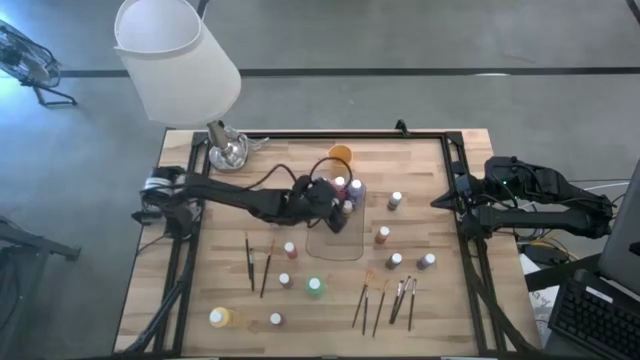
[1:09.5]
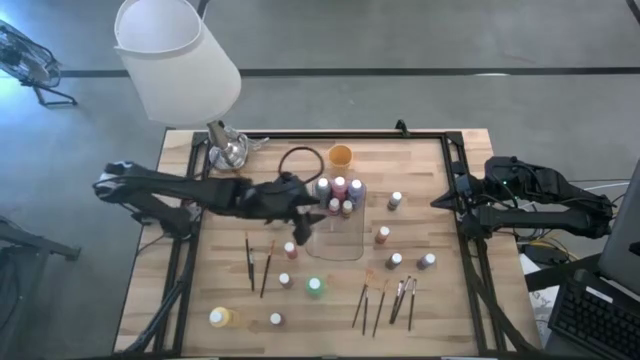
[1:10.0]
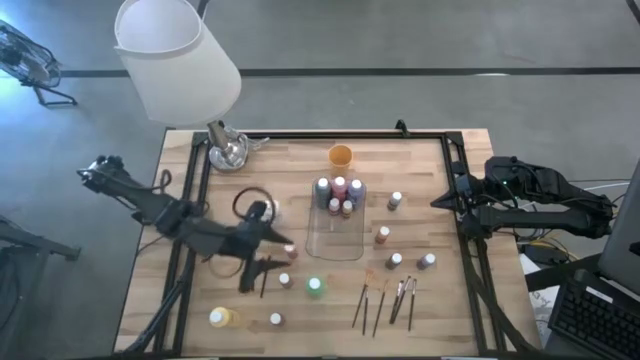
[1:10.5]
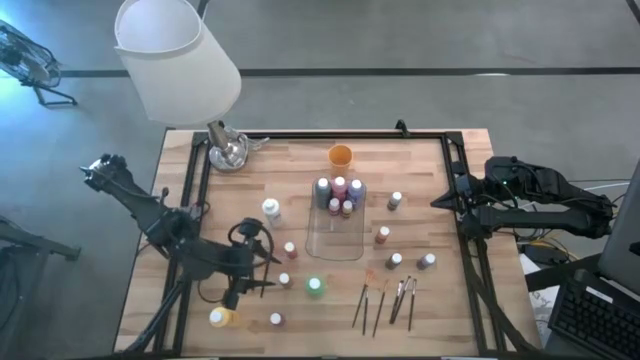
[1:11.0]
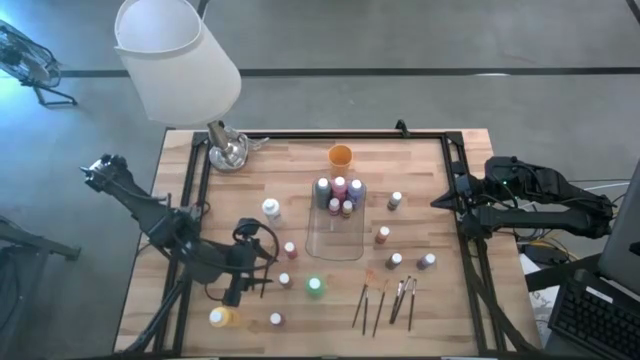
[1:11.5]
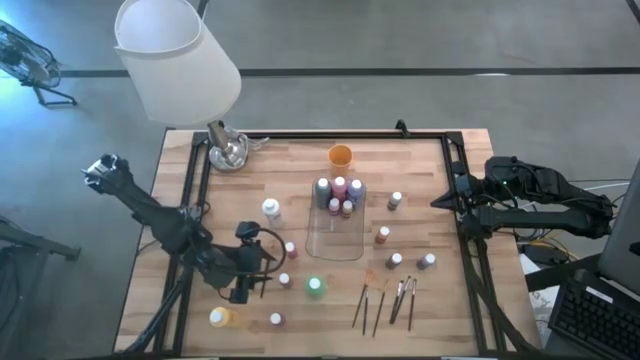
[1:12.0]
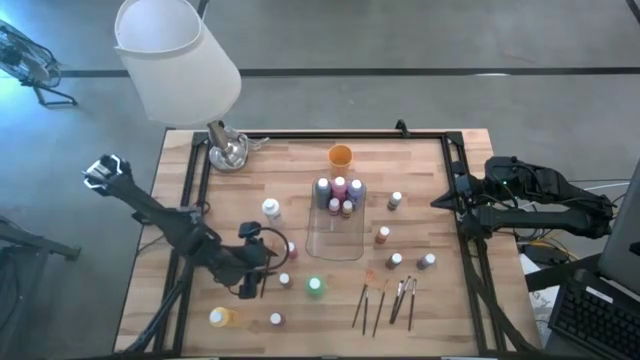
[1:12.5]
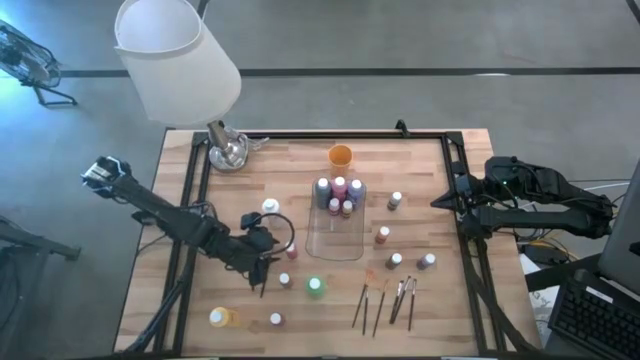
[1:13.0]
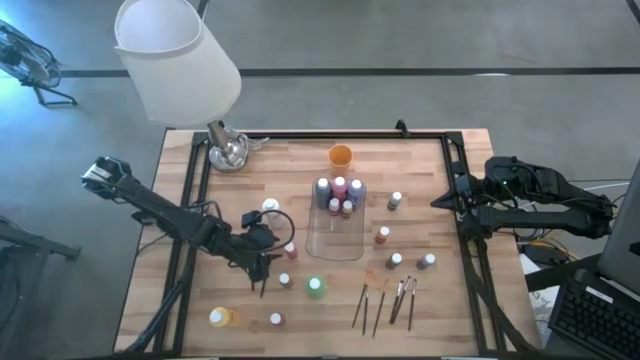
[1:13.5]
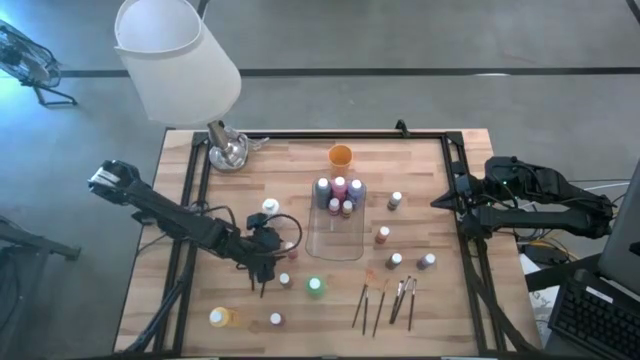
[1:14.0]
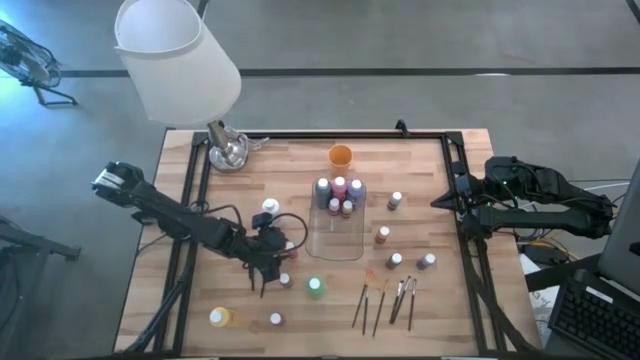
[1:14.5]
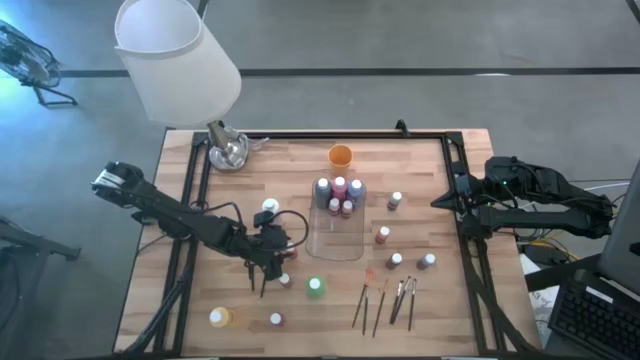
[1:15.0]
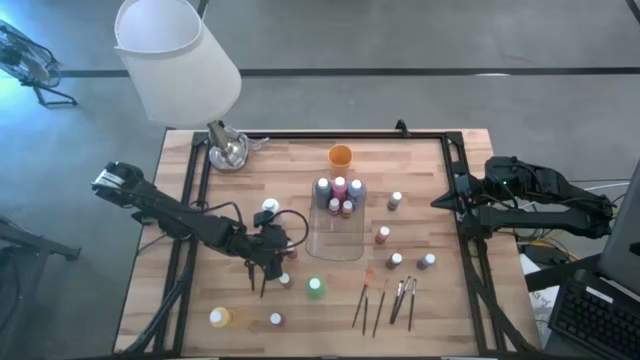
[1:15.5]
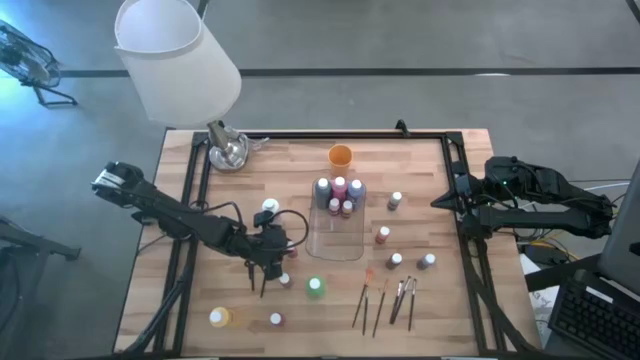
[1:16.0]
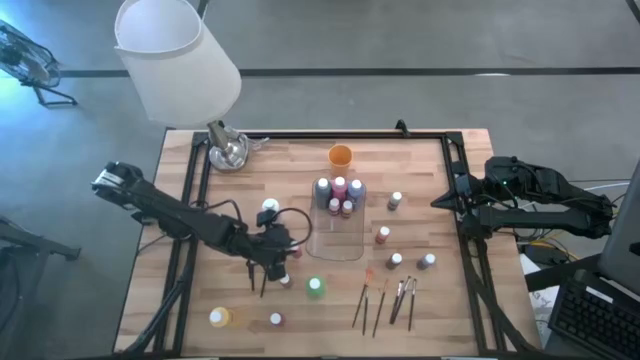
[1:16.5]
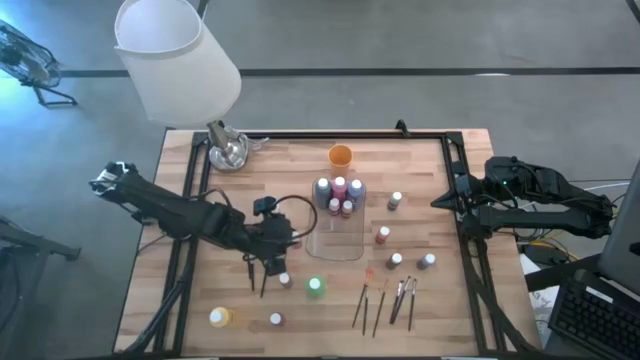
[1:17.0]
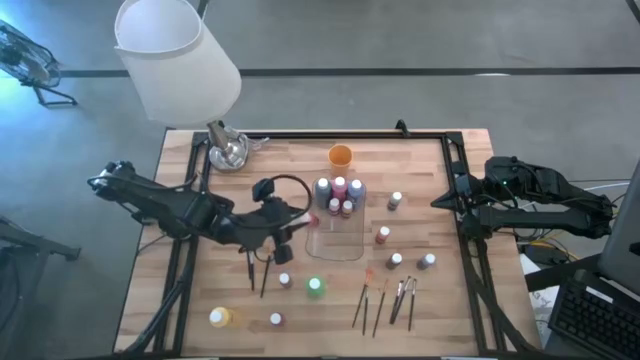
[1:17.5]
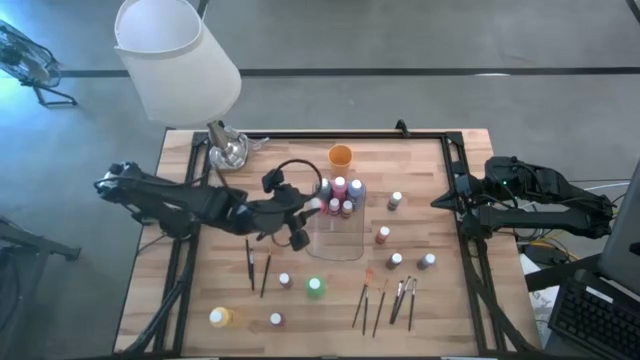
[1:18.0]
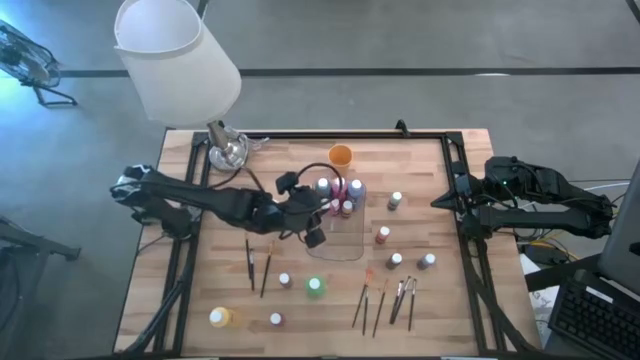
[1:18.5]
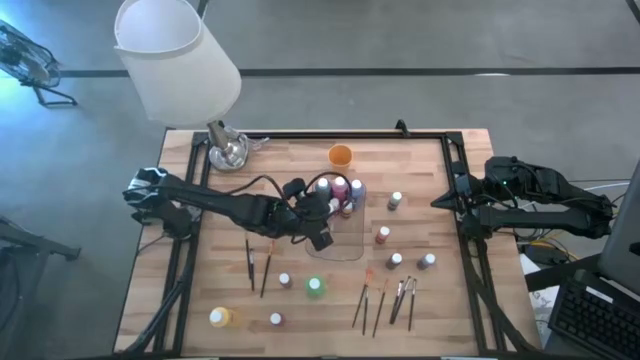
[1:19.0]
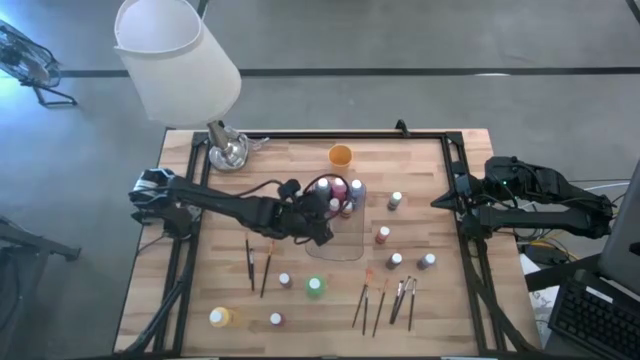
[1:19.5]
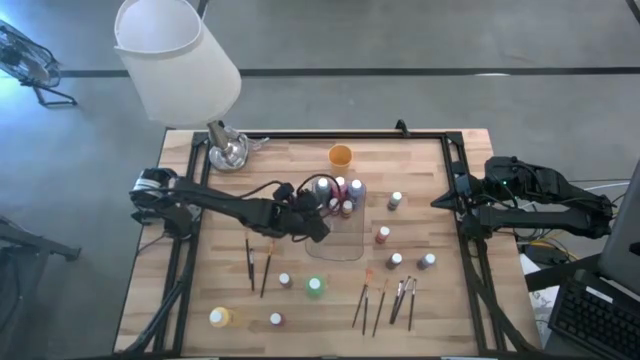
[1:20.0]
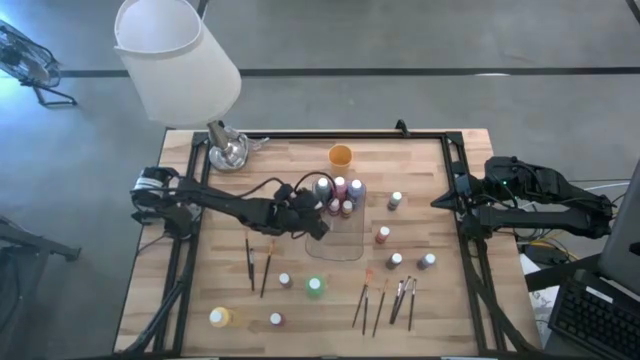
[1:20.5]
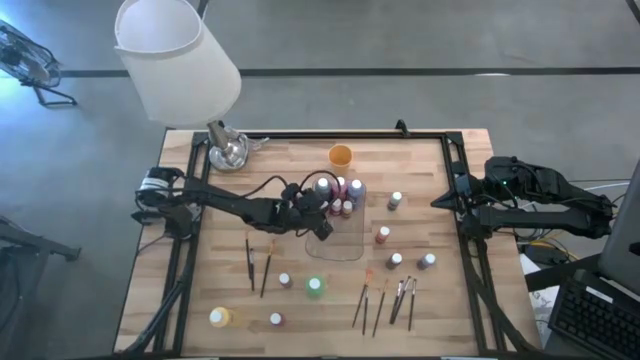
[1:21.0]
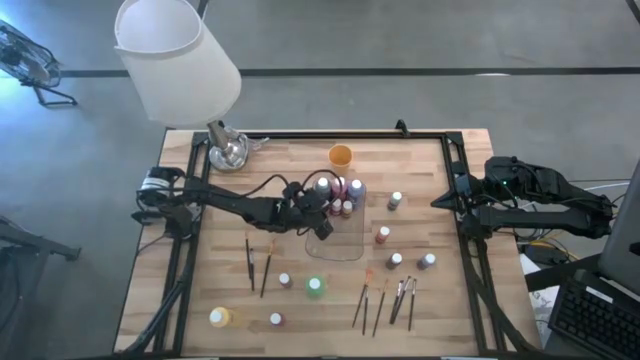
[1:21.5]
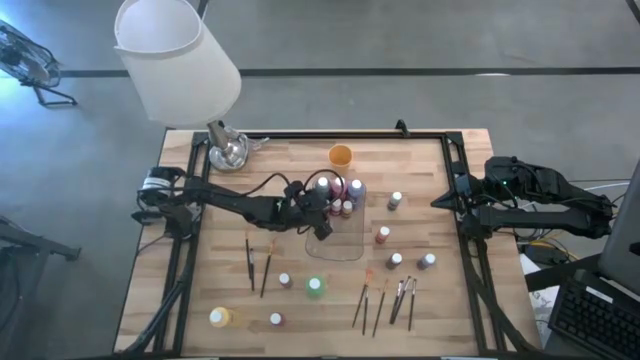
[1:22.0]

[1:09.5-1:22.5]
Task: Pick & Place Paint Supplies
Put the red paint bottle into the transparent bin

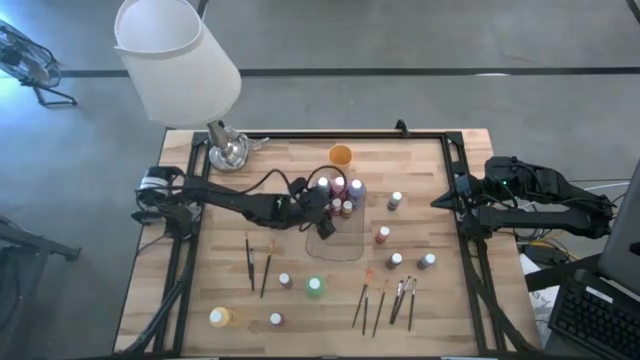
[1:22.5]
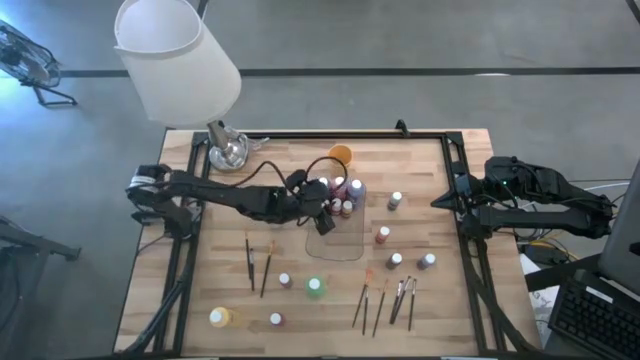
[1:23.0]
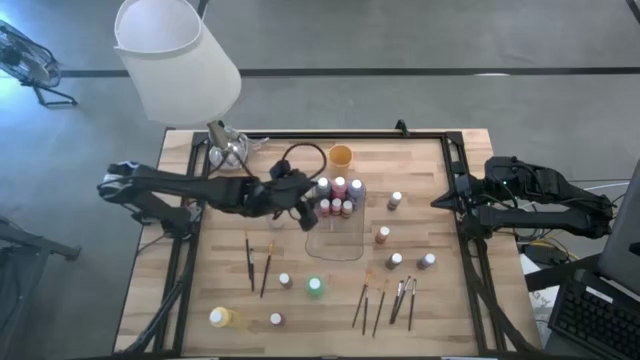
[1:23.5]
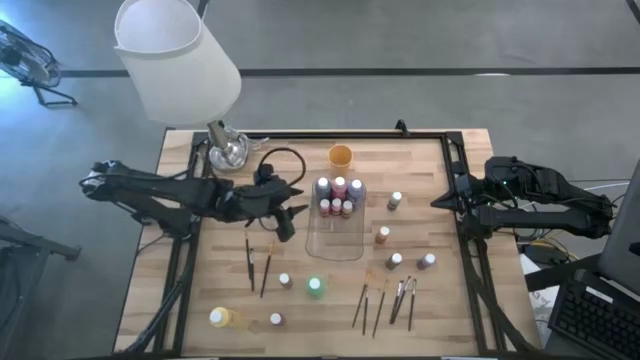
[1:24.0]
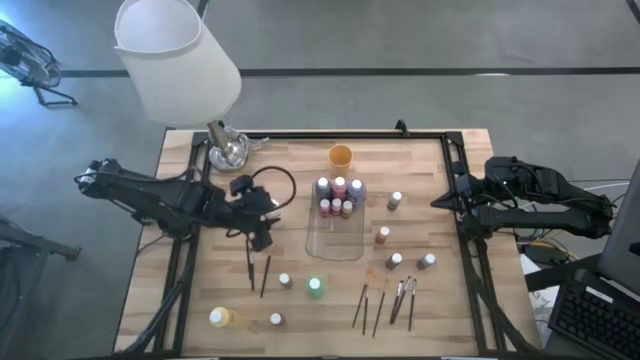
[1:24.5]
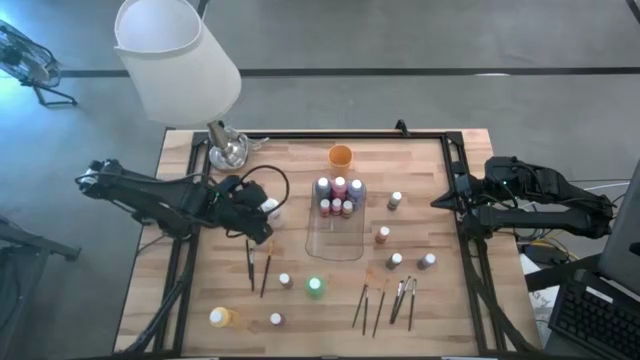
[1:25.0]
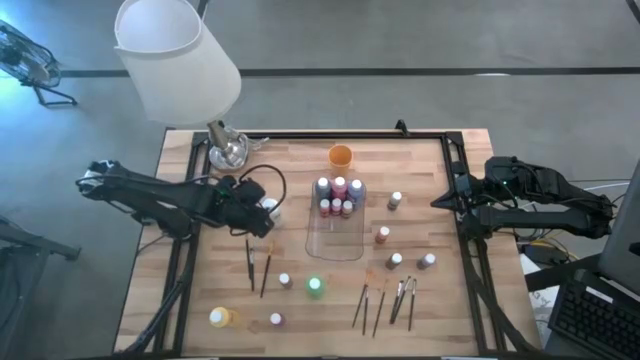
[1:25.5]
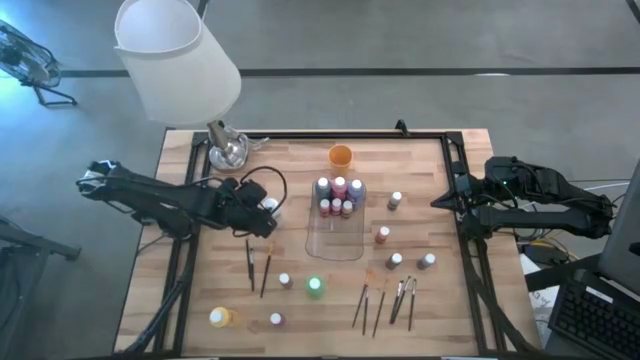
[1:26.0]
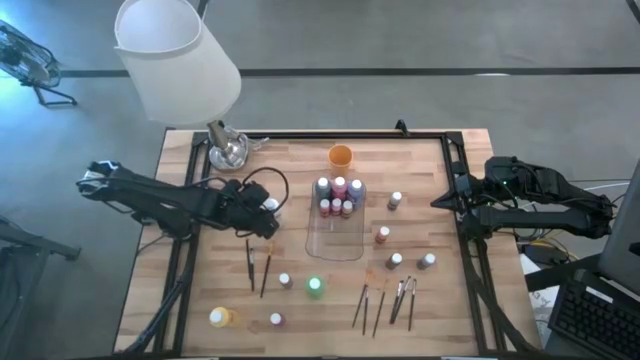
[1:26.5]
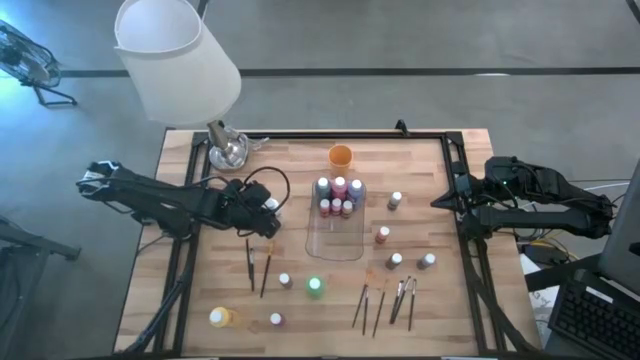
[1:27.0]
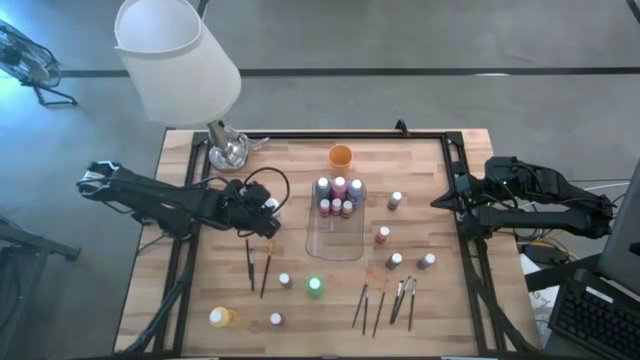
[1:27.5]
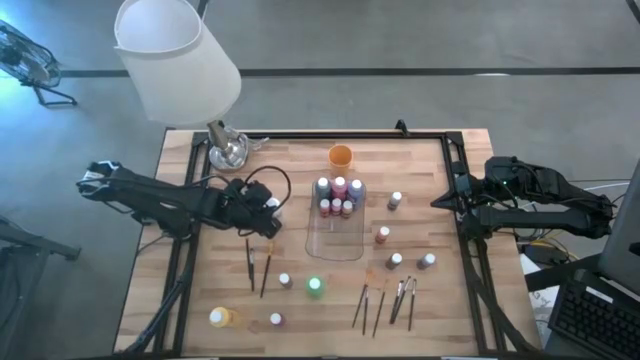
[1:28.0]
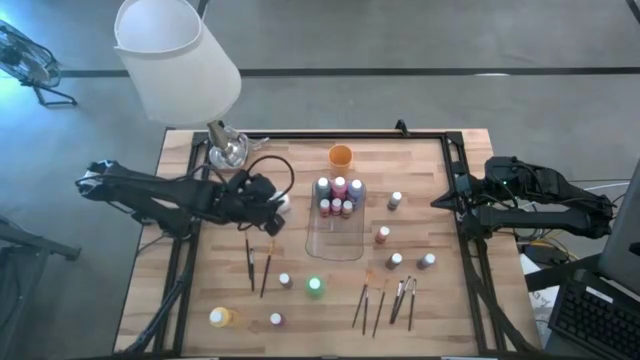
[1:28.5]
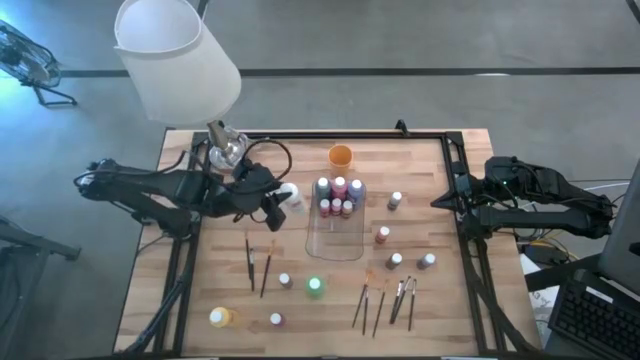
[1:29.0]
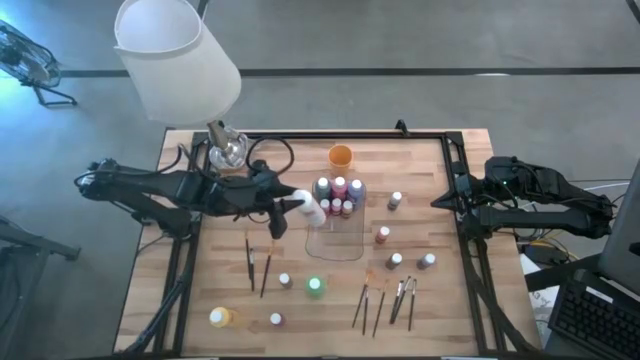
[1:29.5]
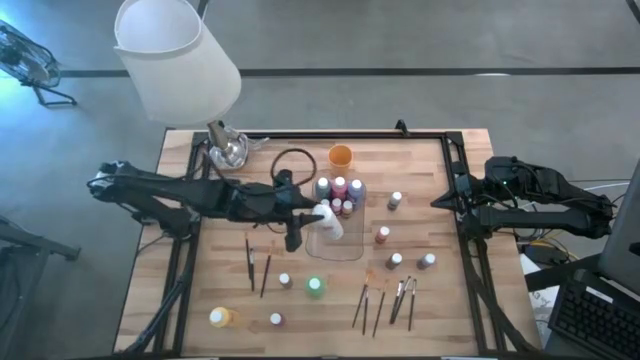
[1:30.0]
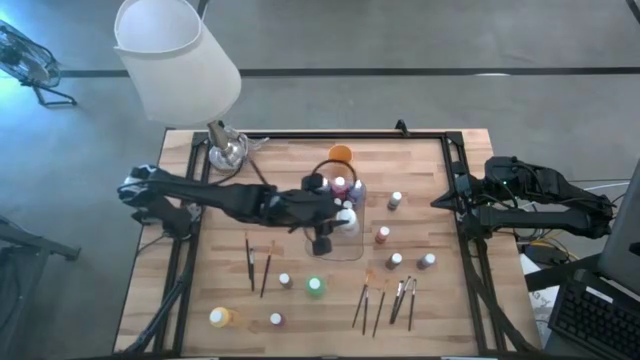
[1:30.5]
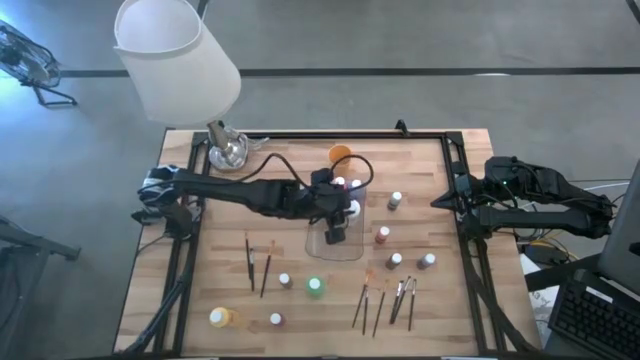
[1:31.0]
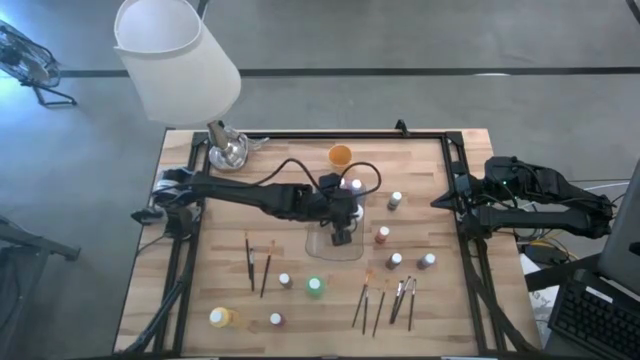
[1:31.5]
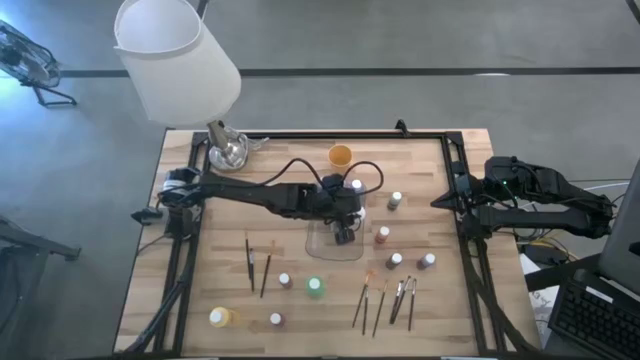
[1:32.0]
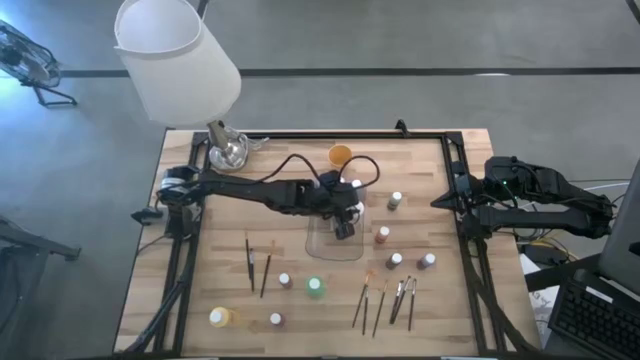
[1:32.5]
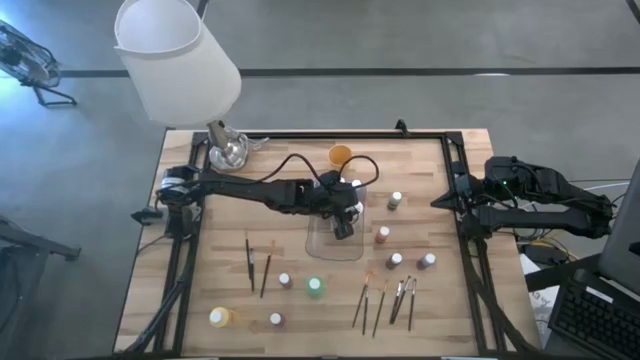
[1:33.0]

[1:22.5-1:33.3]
Put the white paint bottle into the transparent bin
